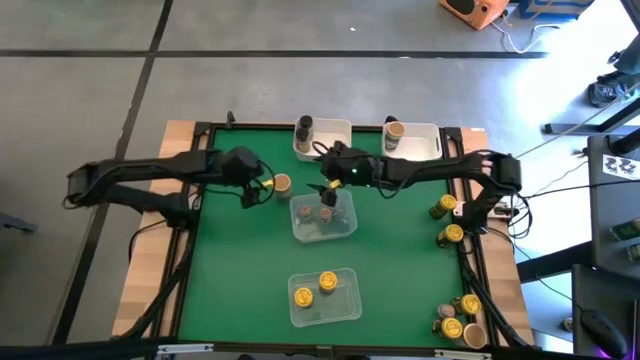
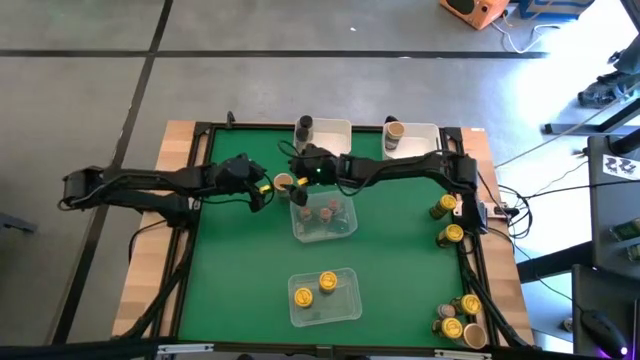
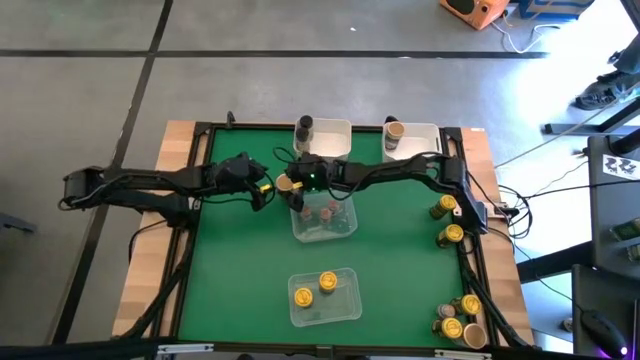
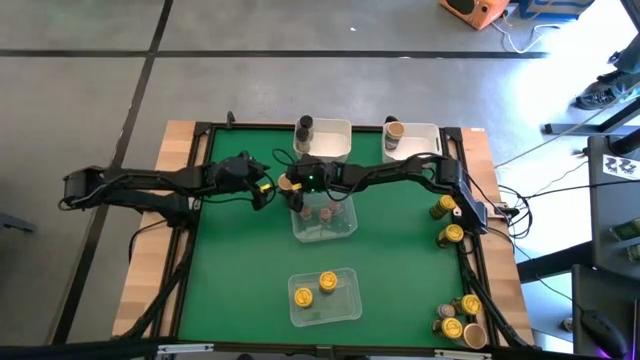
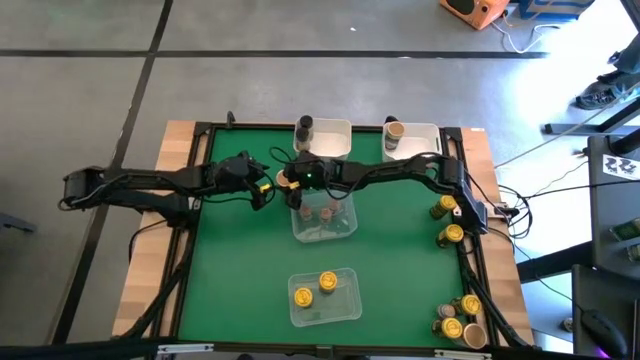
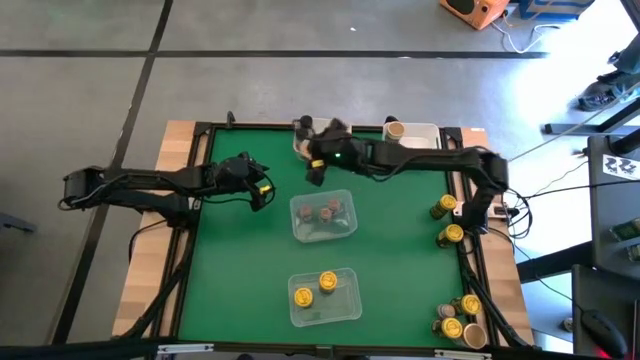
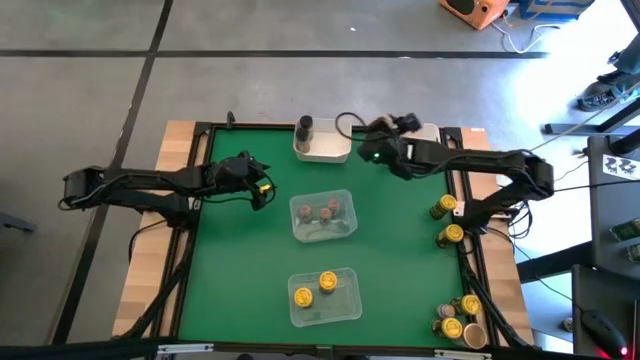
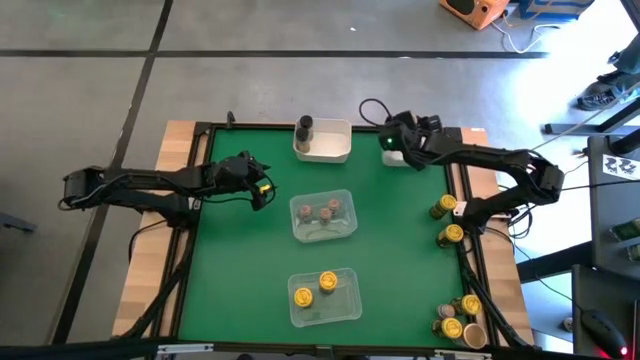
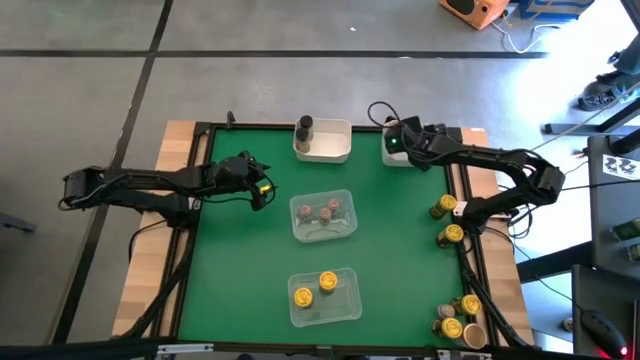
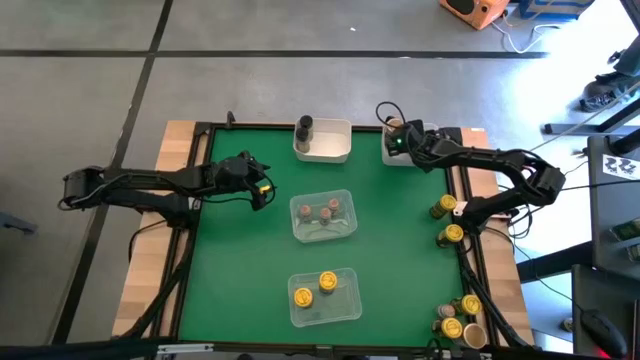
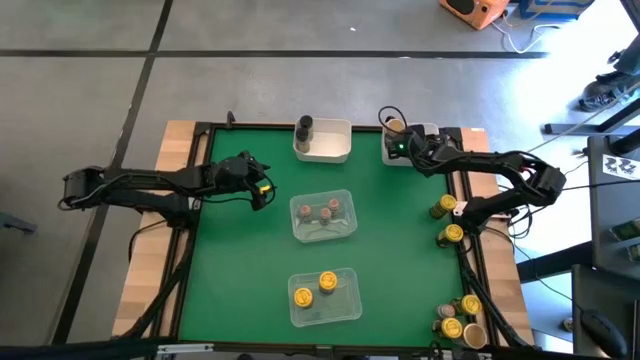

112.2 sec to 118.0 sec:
Task: Sort spices by type
Put the center brown seasoning bottle into the top right white bin

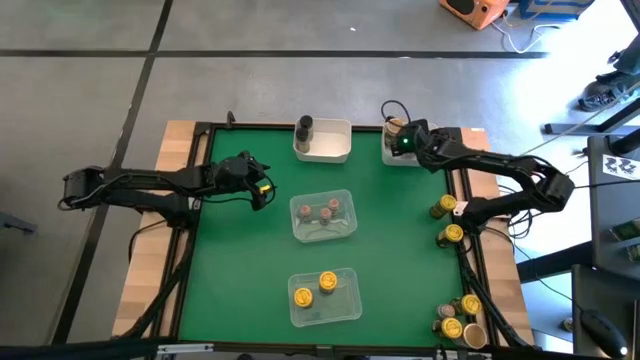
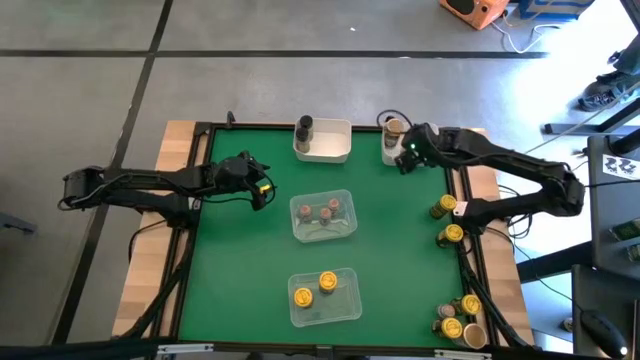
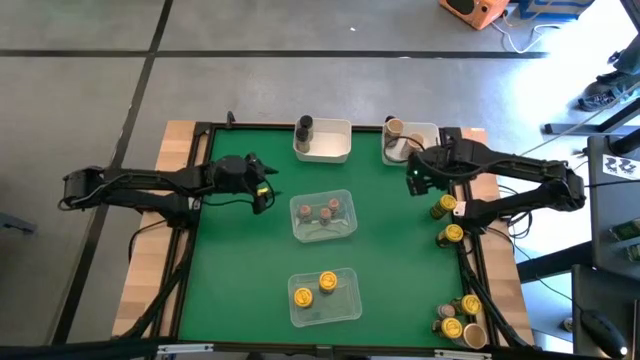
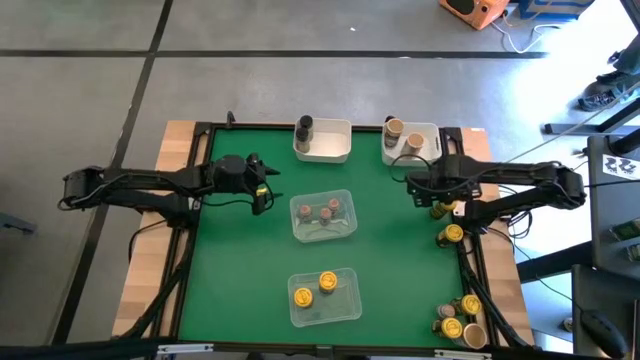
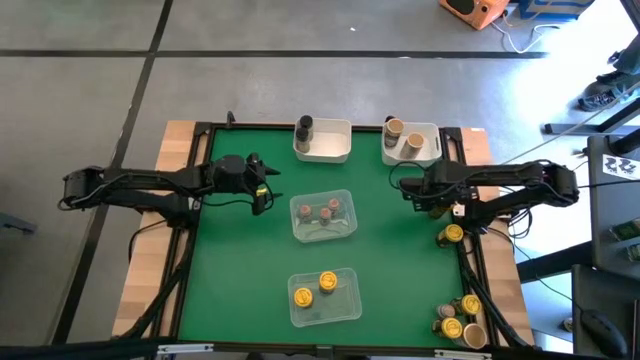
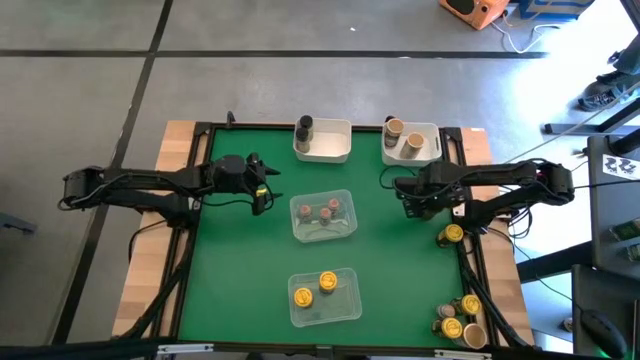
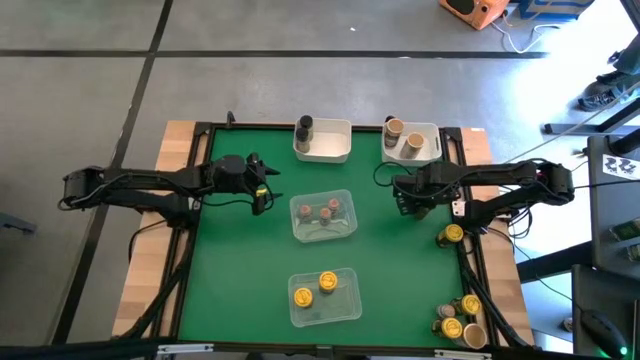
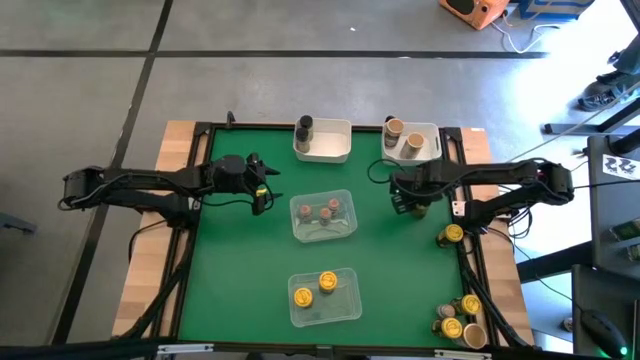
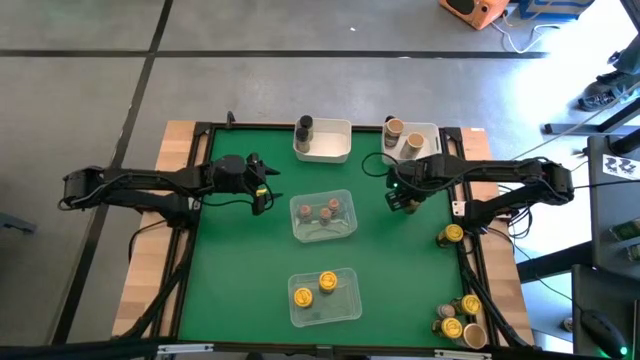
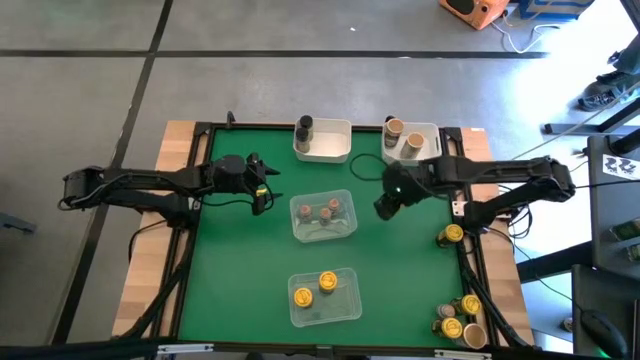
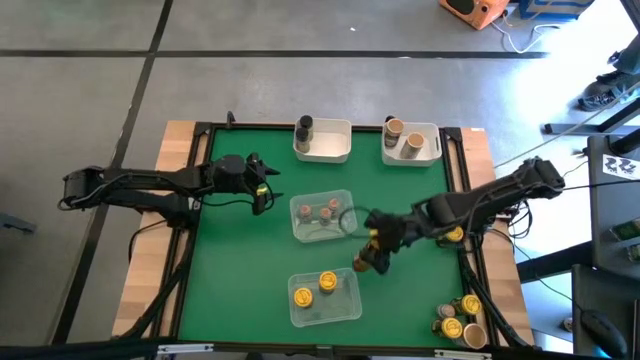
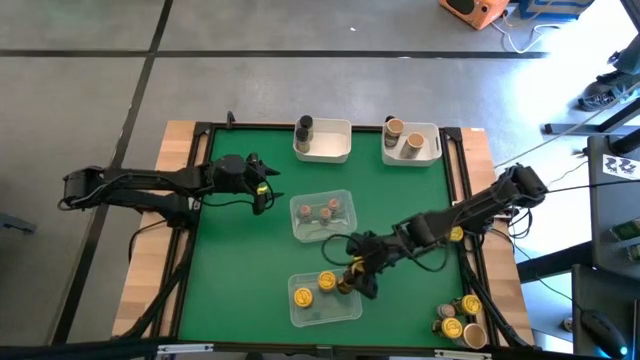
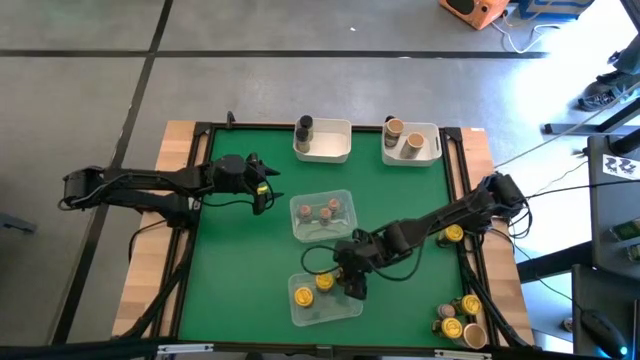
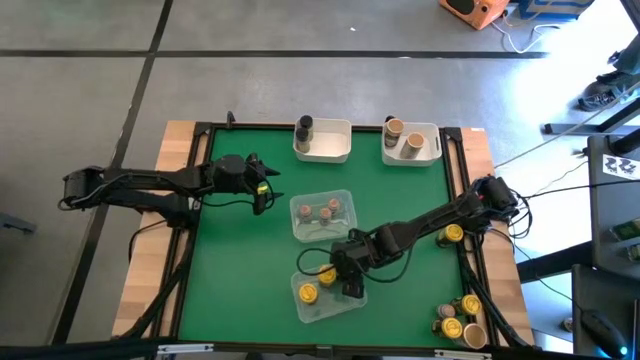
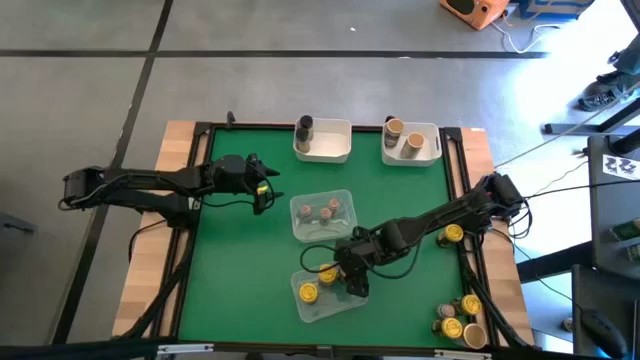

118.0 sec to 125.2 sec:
Put the middle right yellow seasoning bottle into the bottom transparent bin

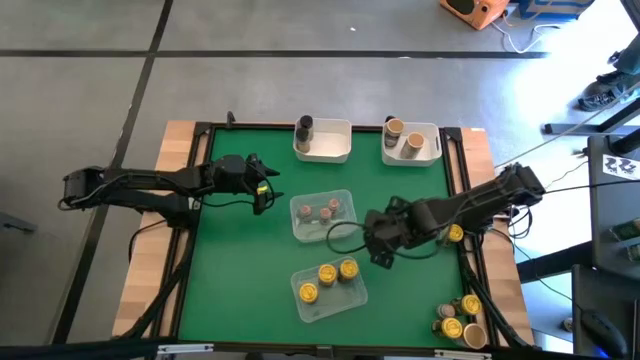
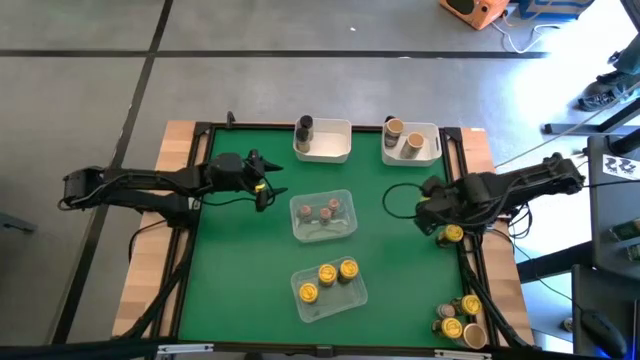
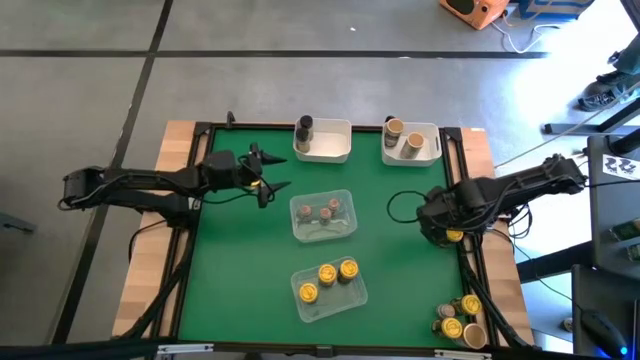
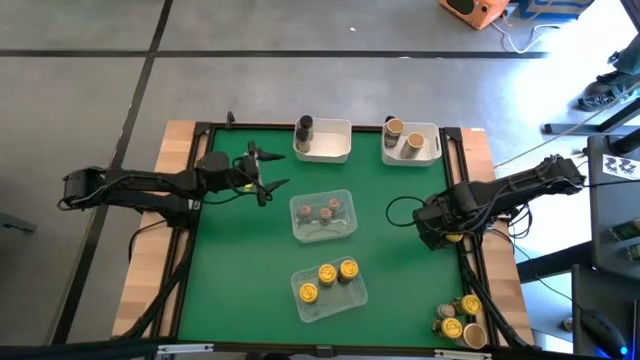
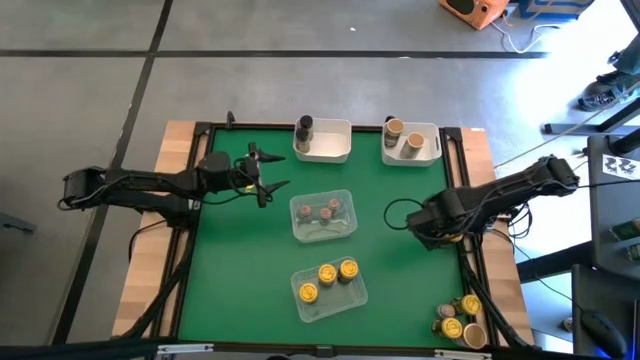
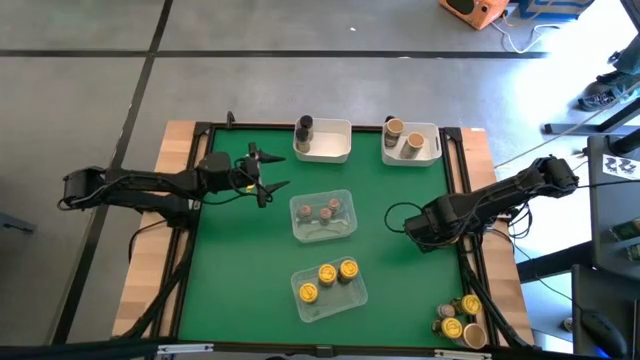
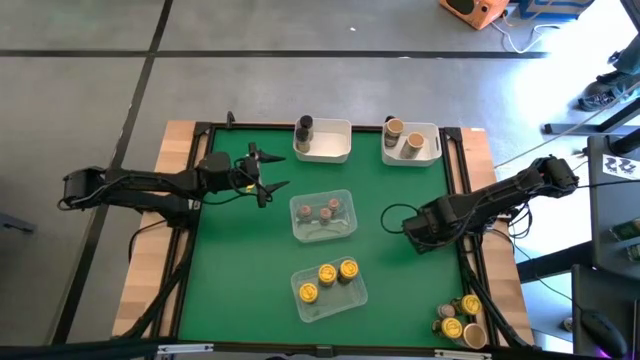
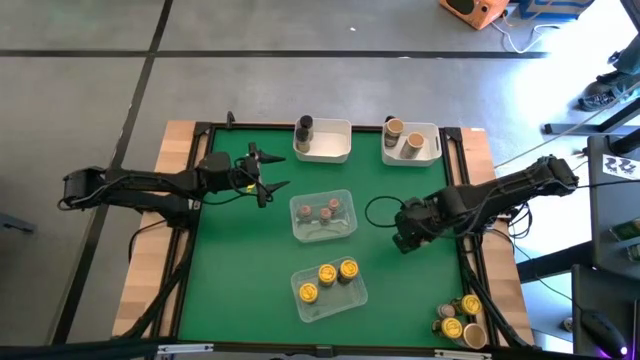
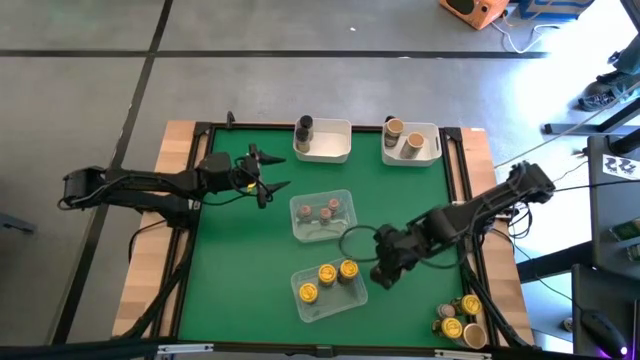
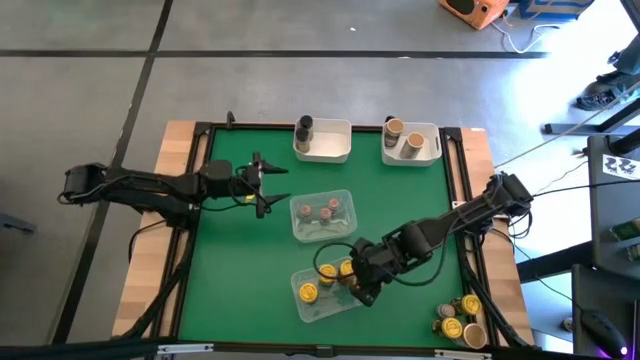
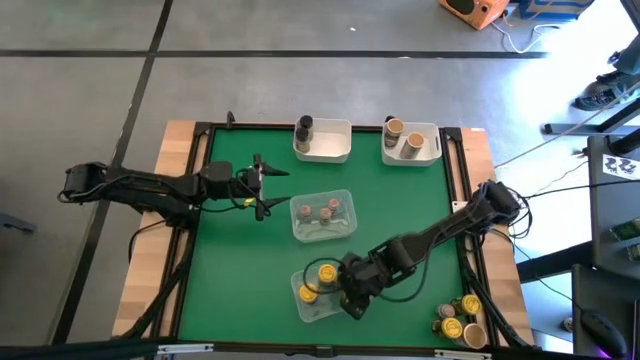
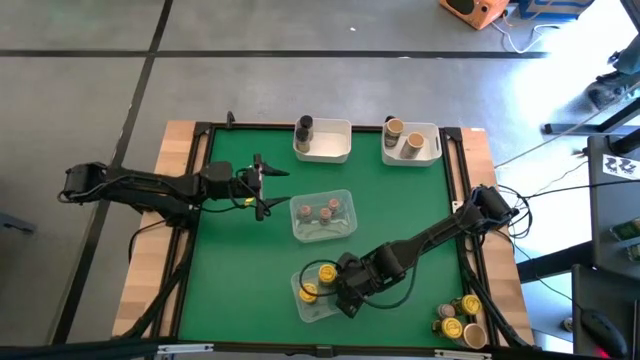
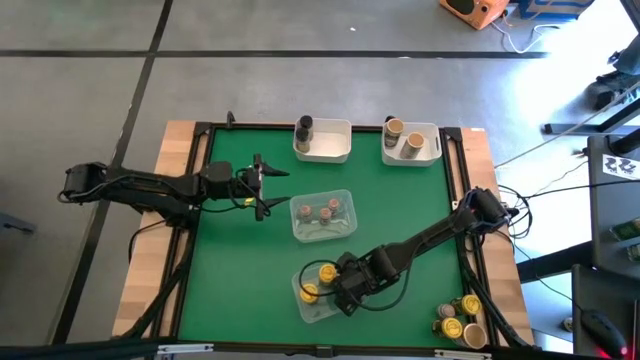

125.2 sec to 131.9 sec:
Put the middle right yellow seasoning bottle into the bottom transparent bin

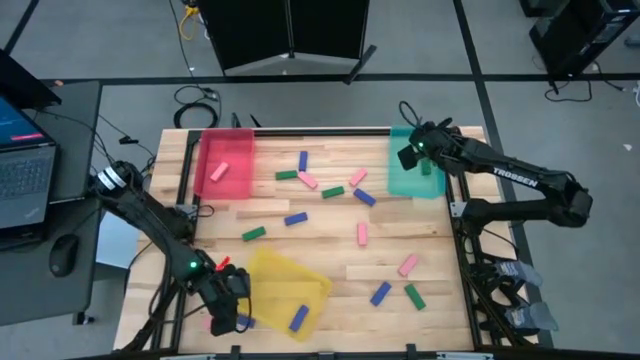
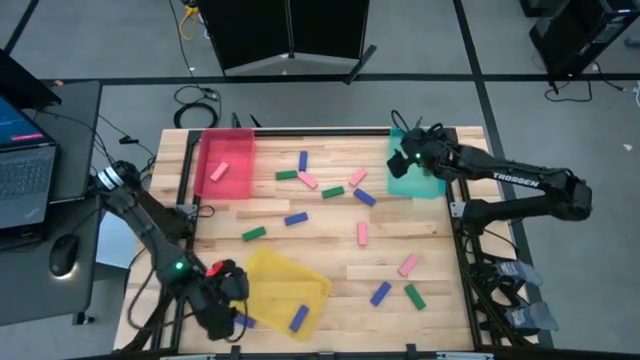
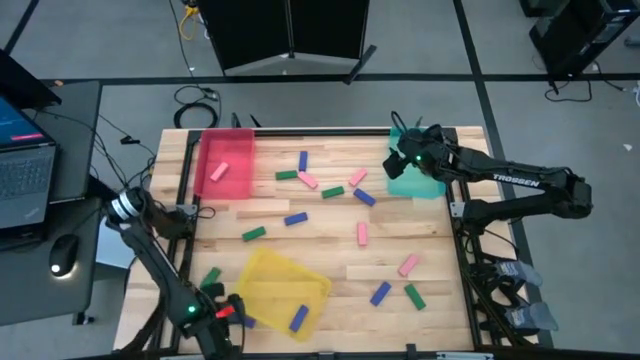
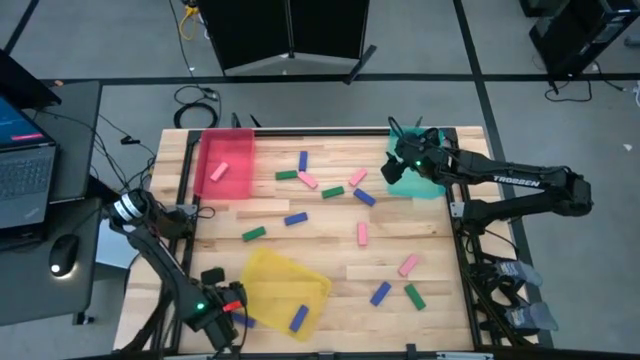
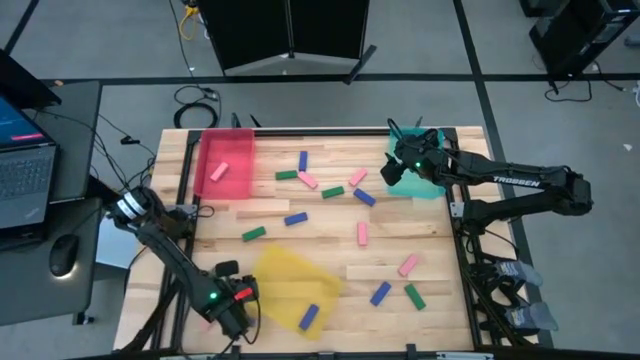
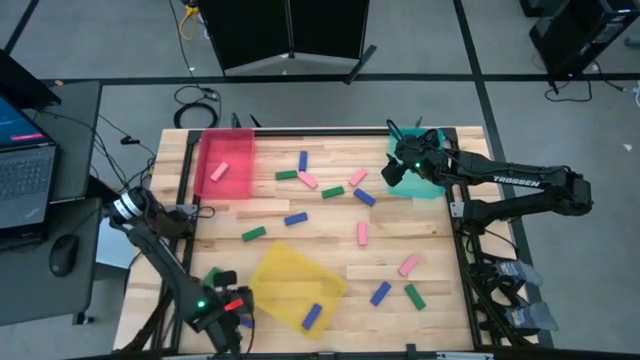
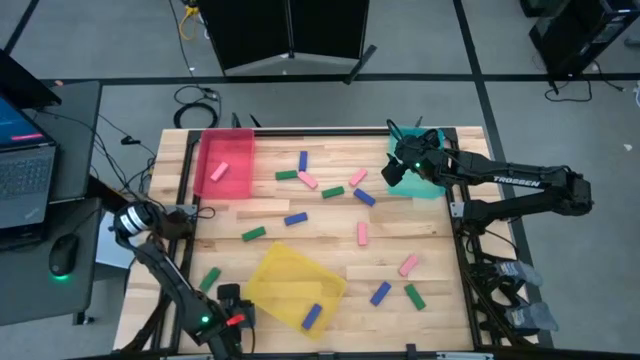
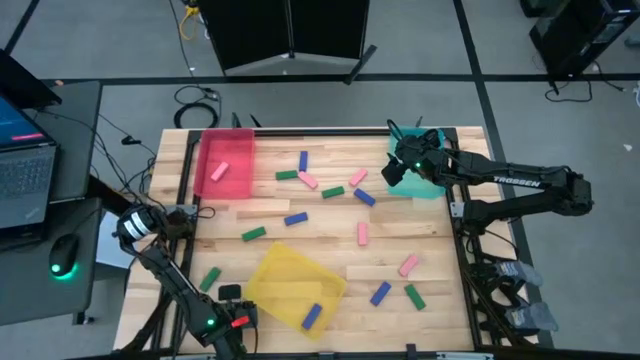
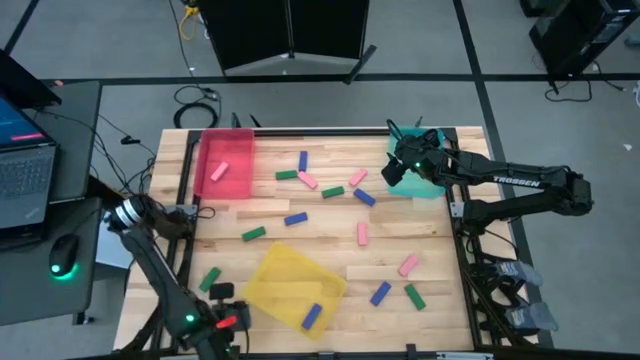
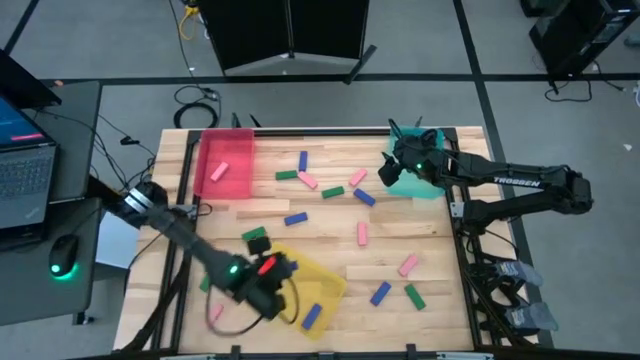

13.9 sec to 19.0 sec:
Task: Sort blocks
Put the blue block into the yellow bin
